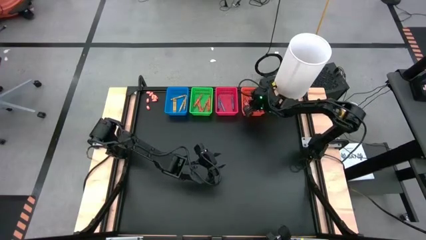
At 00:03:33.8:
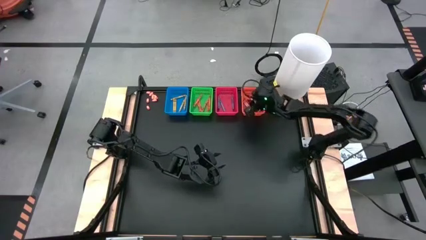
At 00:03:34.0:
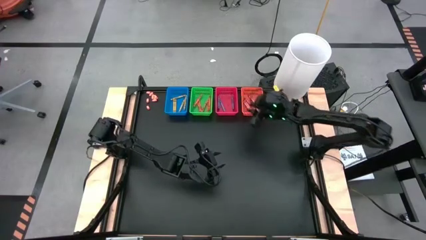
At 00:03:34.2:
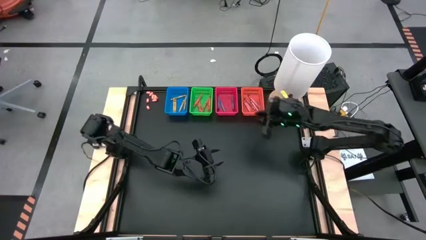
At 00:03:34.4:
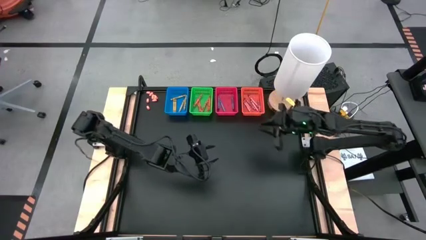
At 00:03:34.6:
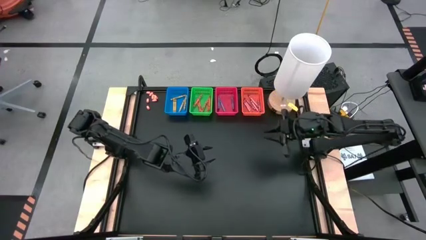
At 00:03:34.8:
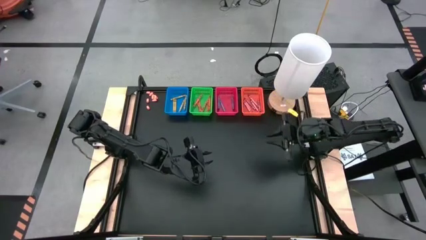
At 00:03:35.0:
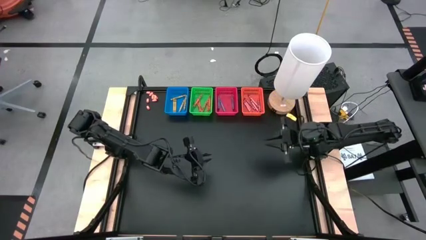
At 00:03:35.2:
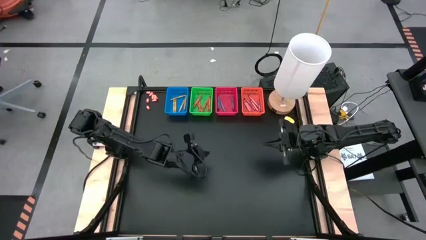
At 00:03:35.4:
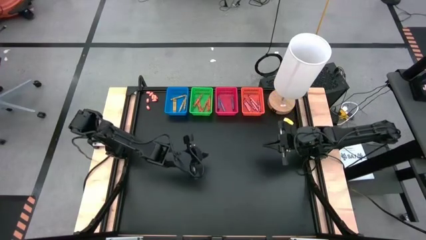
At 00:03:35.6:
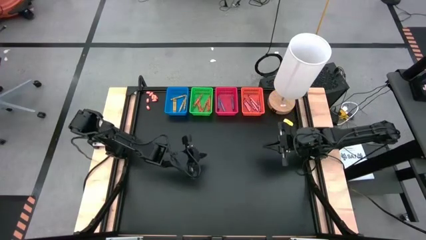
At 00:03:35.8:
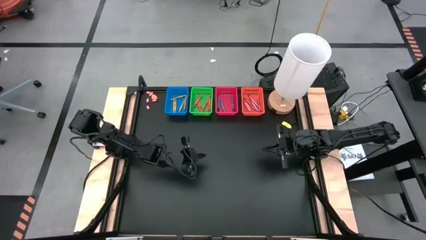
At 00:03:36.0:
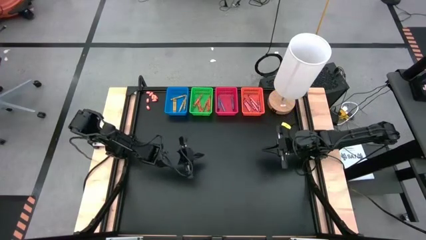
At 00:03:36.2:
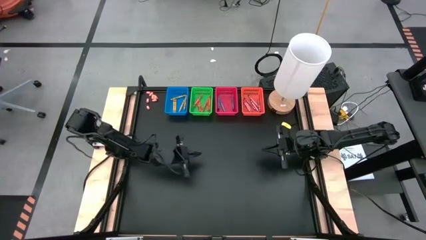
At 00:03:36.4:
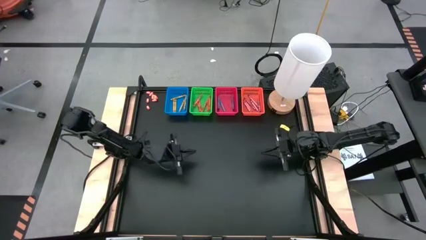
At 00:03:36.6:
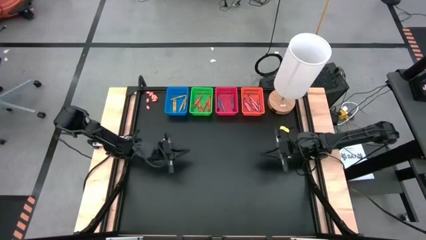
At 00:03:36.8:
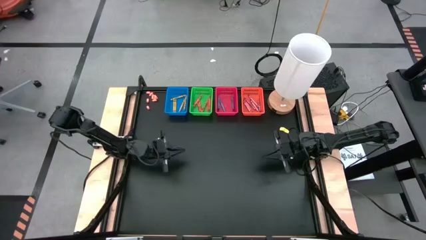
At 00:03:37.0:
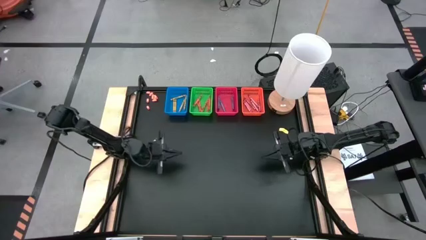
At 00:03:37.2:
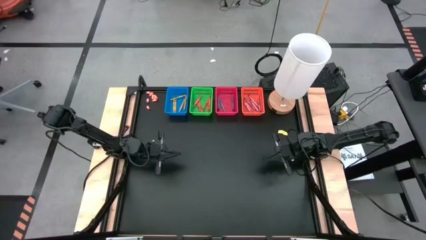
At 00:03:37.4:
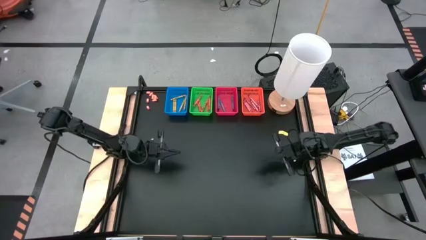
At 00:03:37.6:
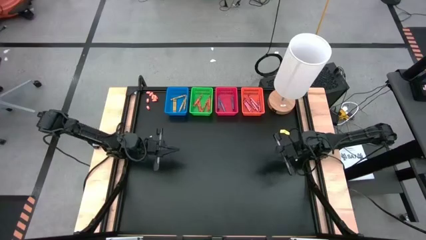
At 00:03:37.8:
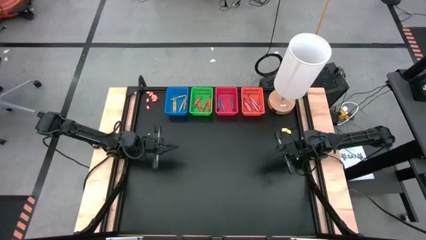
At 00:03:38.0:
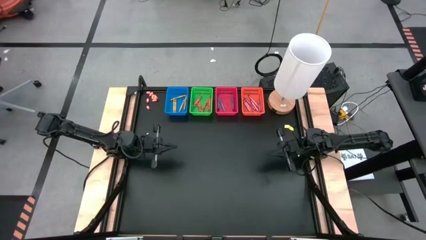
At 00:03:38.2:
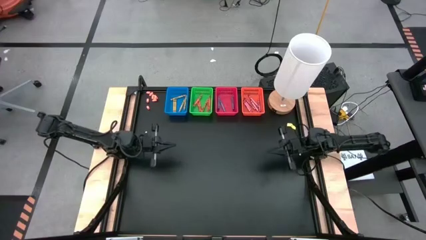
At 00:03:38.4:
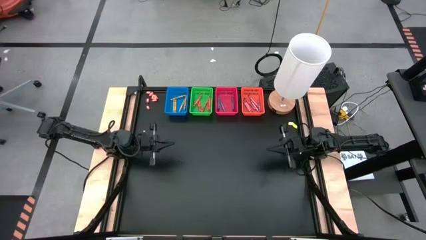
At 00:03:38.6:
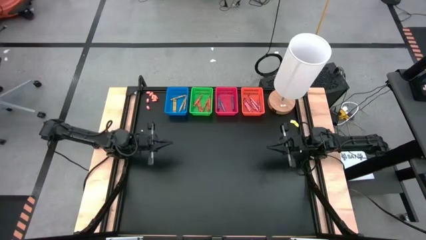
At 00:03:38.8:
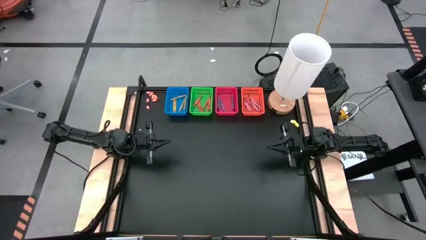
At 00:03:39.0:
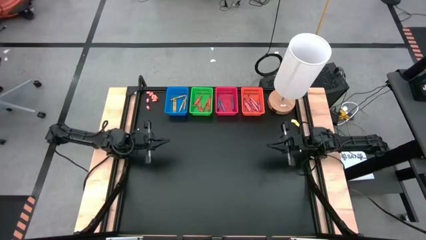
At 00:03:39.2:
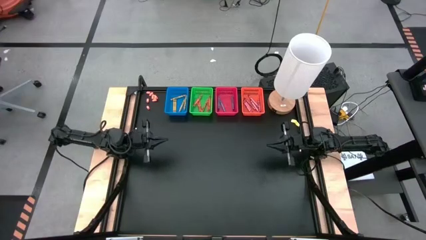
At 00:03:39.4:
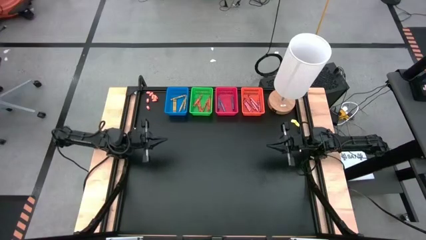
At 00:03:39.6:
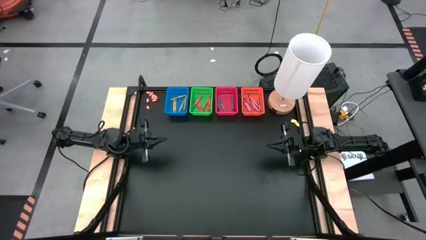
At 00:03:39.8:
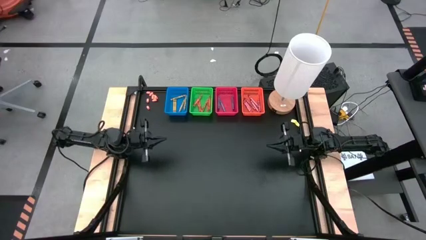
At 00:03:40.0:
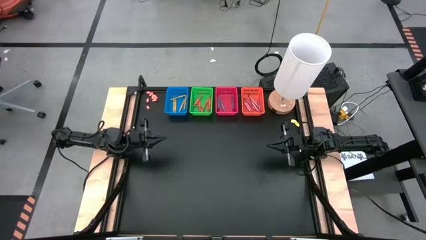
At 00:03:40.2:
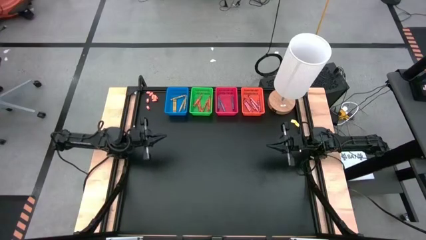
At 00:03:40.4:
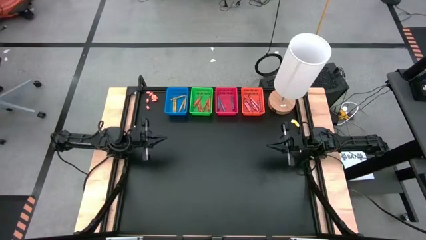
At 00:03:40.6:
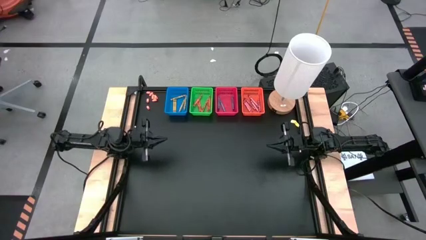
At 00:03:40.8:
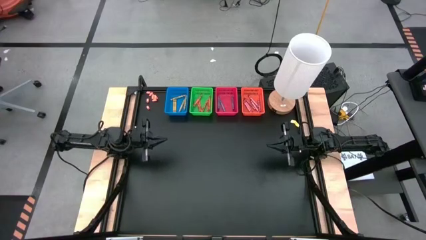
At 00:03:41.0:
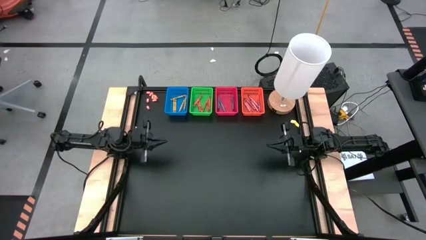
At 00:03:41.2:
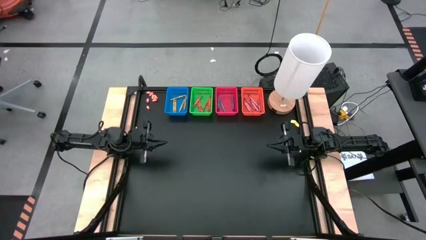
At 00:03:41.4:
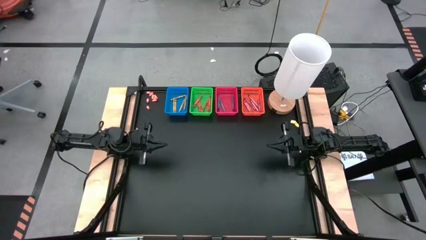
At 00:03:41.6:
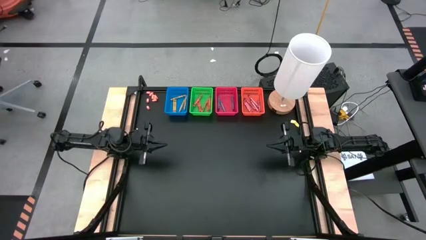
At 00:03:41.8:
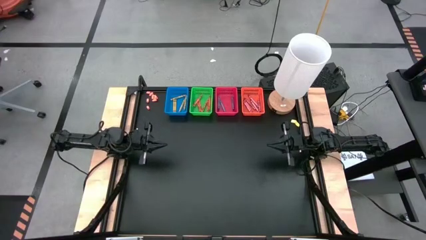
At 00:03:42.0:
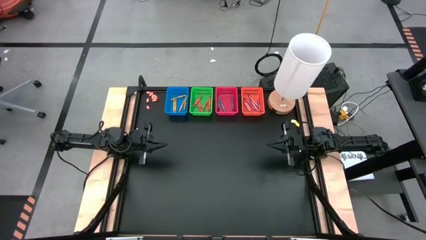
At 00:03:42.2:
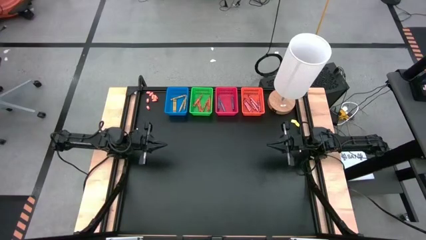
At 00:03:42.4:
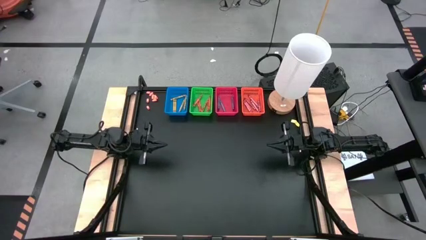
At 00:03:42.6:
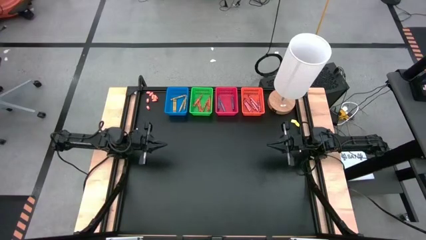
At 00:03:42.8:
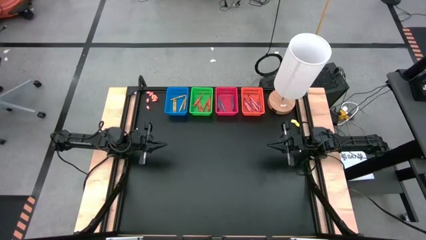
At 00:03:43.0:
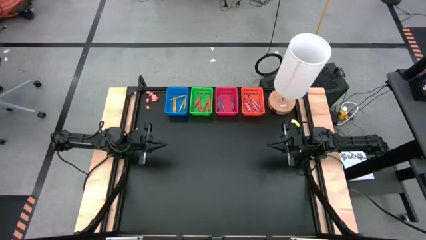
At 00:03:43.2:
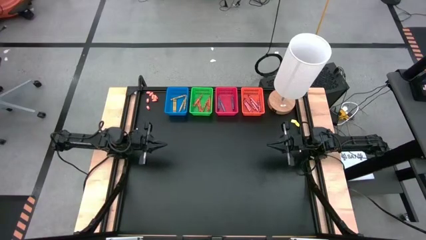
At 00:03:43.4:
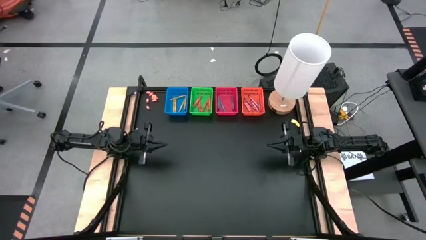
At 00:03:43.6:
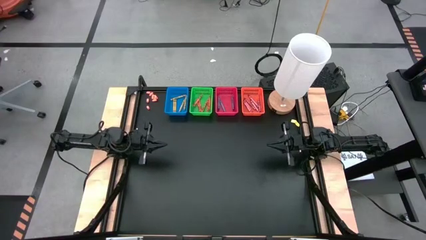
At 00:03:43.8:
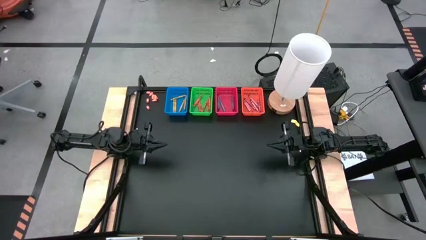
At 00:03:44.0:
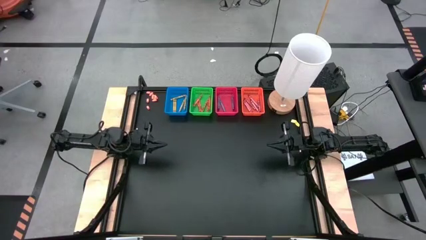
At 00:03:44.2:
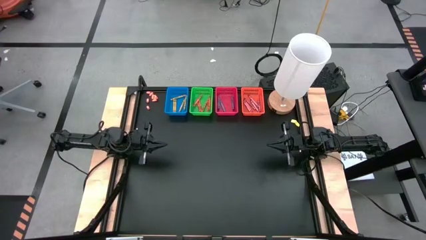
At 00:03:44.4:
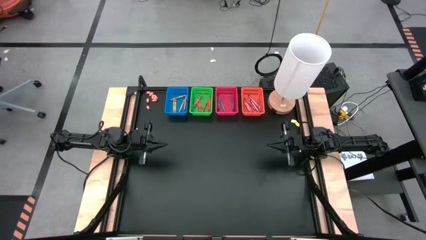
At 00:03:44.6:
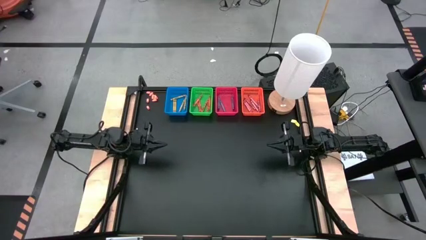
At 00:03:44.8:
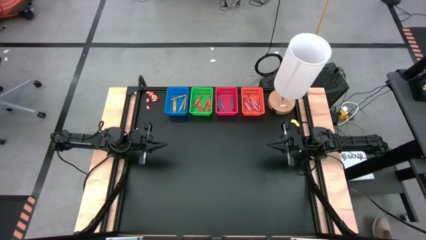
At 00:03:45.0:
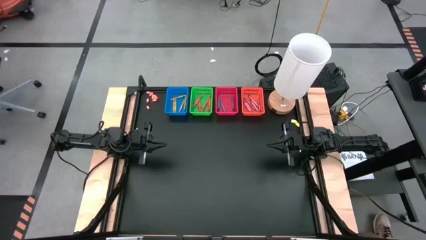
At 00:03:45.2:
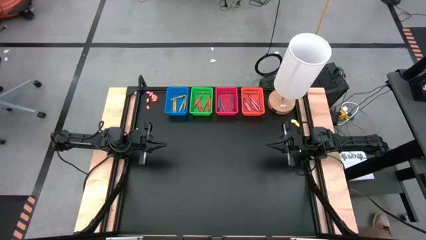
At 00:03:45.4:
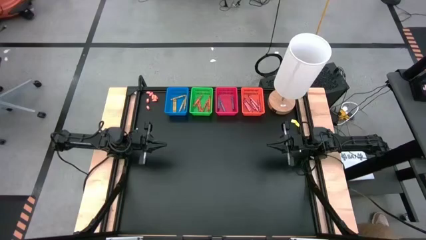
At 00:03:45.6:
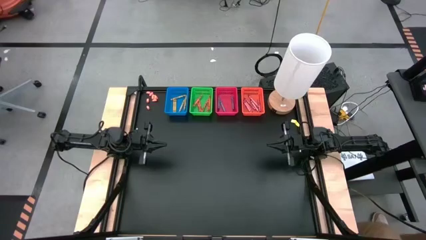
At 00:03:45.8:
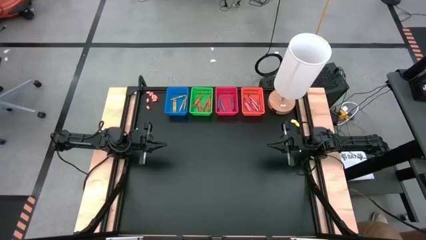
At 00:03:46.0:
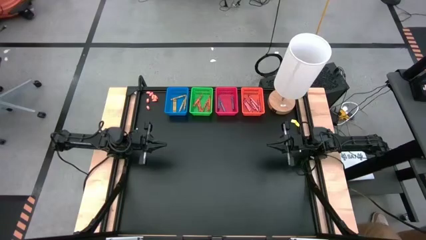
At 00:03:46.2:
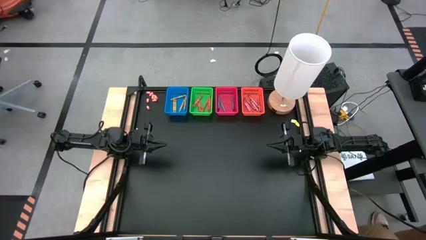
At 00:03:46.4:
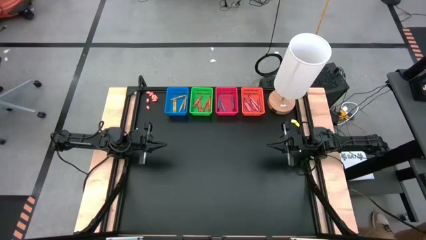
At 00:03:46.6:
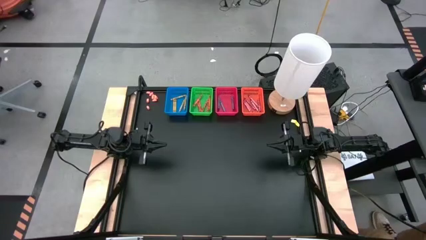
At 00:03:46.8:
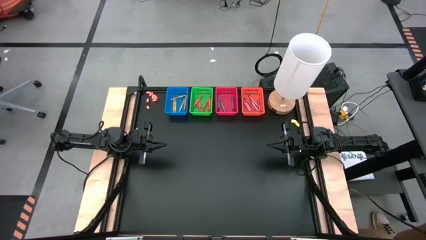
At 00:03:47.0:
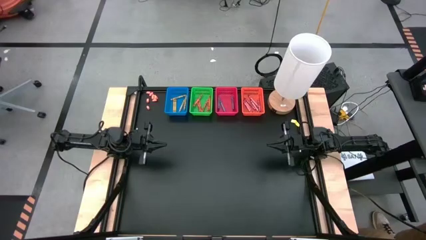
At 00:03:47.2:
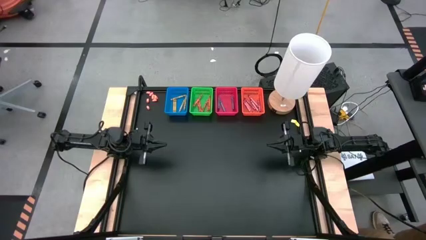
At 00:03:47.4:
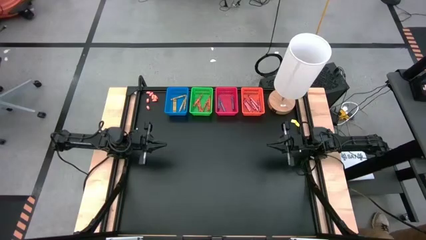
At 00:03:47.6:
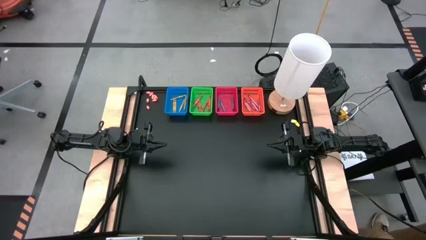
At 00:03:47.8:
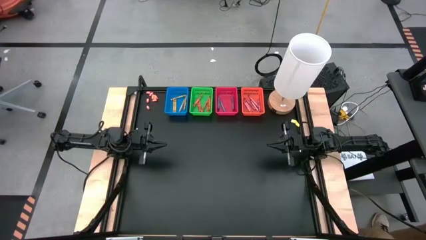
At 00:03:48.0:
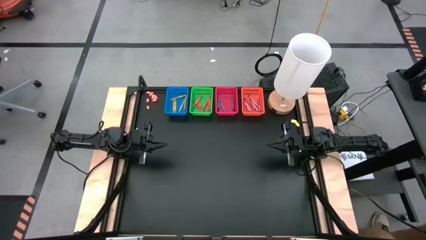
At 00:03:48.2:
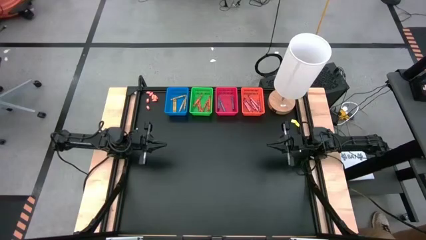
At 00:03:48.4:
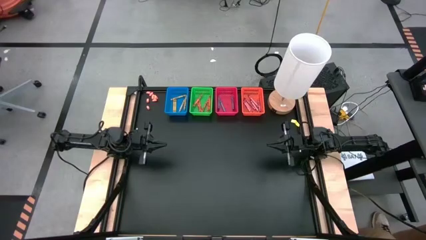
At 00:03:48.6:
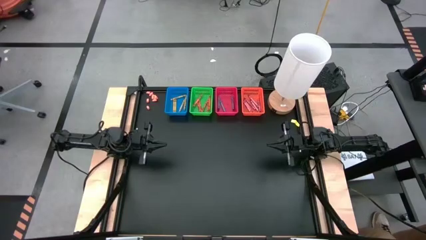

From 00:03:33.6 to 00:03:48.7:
Task: Sort crayons
Return to Home Position

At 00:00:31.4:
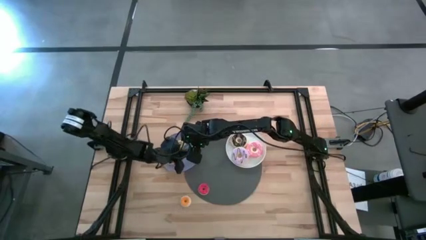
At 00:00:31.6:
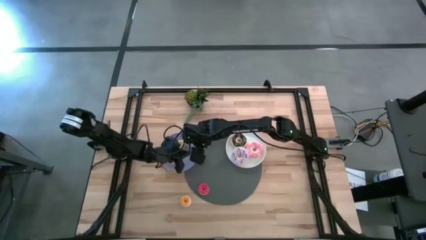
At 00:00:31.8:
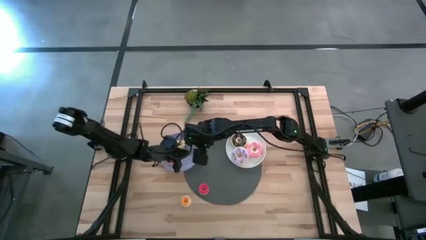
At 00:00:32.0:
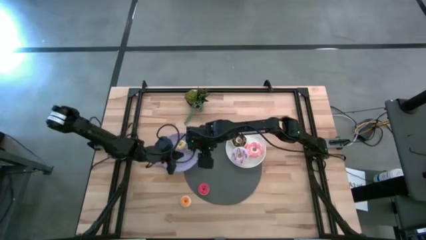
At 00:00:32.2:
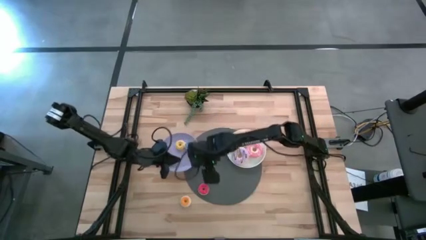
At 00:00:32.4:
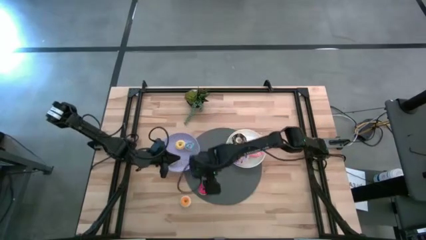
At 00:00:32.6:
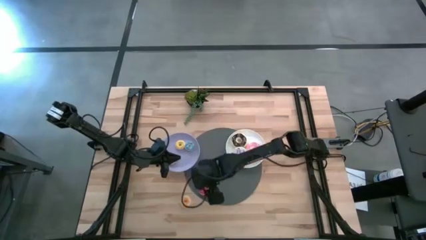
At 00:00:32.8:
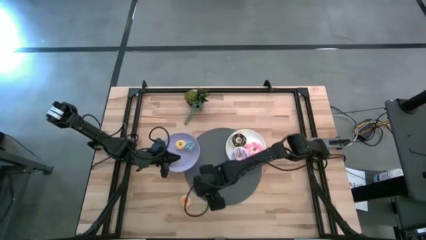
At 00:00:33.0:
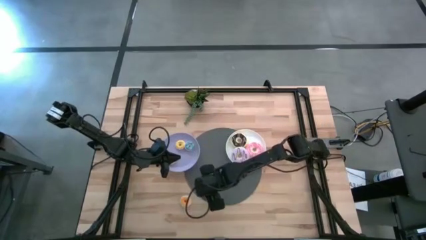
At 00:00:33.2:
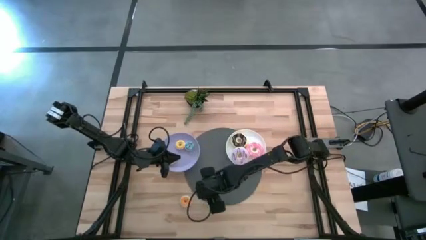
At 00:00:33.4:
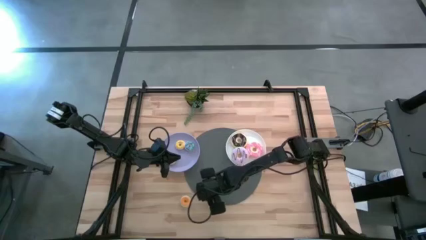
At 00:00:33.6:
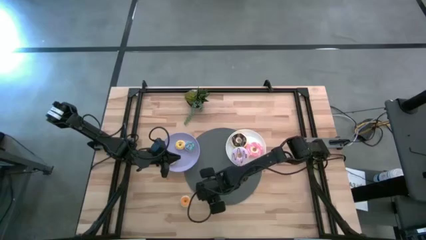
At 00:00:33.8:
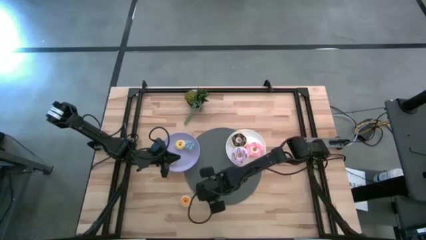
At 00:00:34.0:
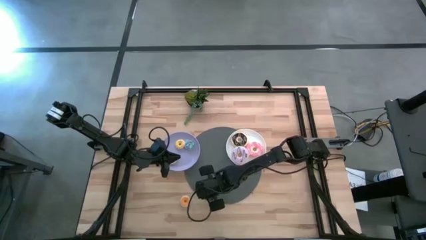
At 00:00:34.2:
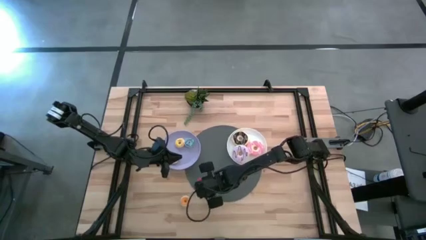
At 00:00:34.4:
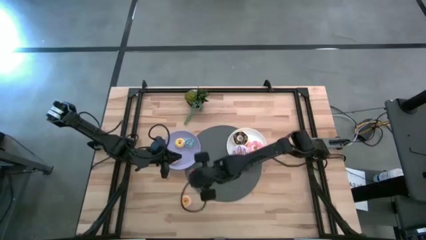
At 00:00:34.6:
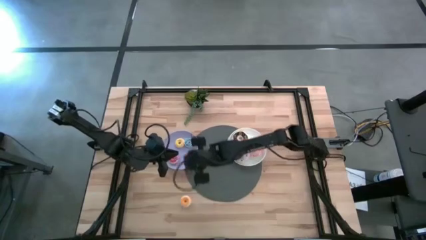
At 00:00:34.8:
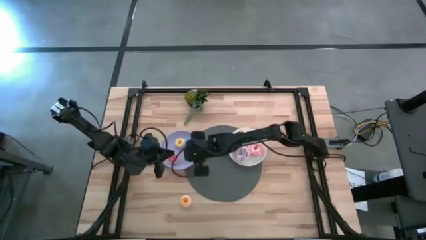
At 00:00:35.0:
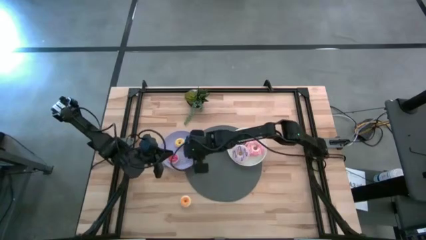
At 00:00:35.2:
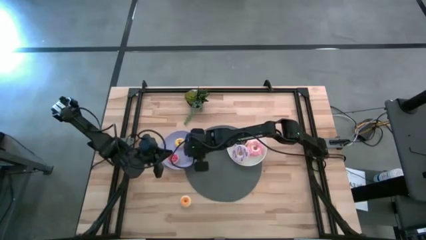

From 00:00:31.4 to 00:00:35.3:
Task: Pick & Place donuts
Put the small red donut on the purple plate
